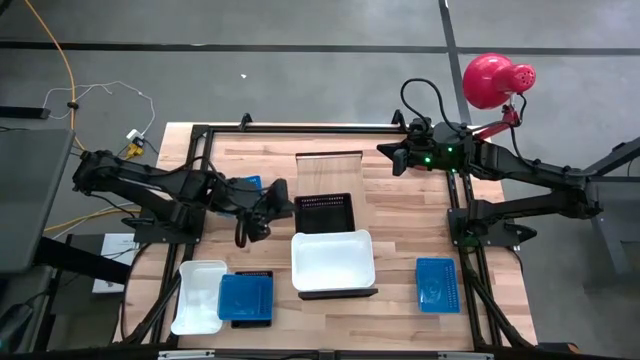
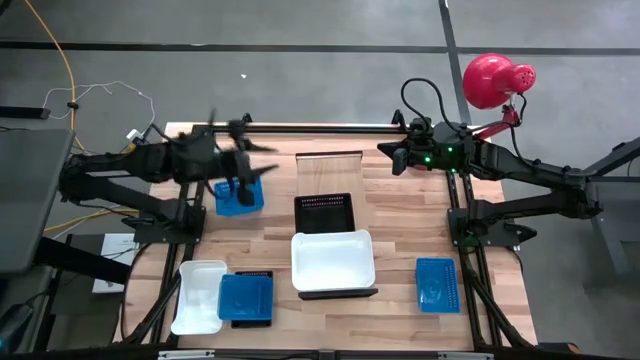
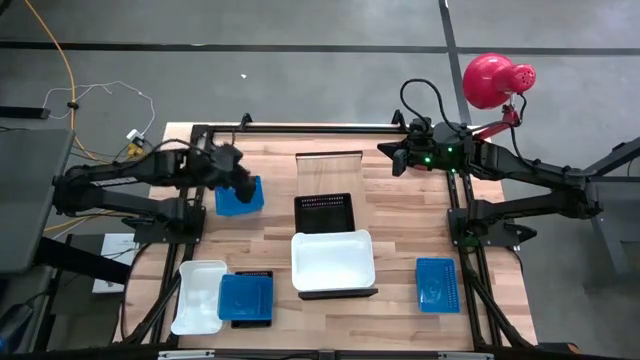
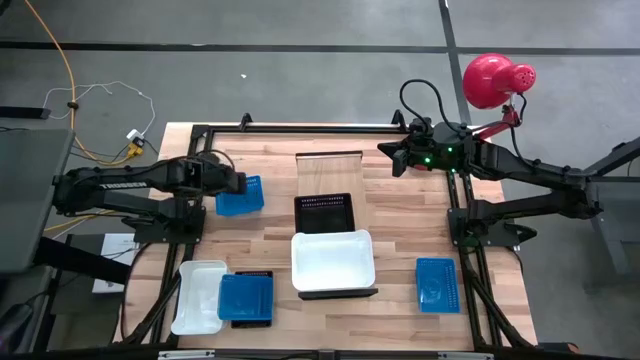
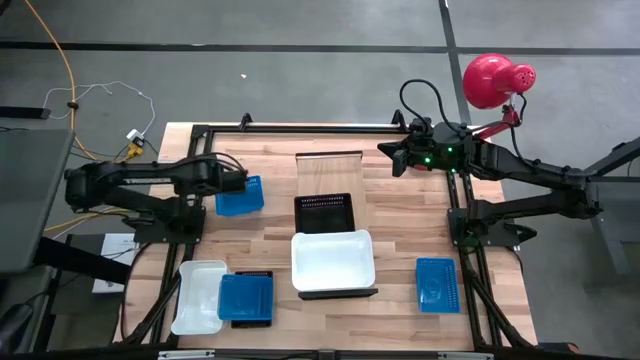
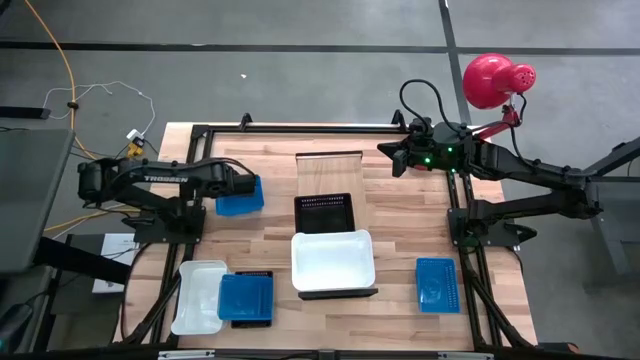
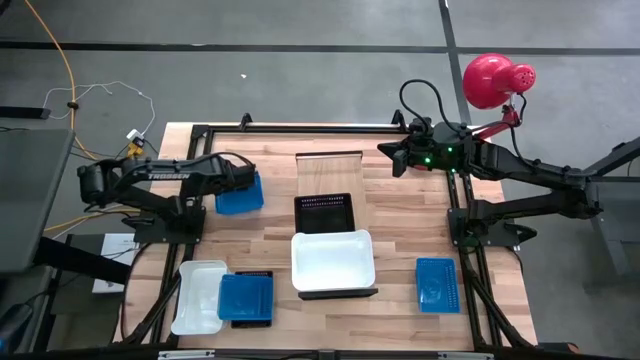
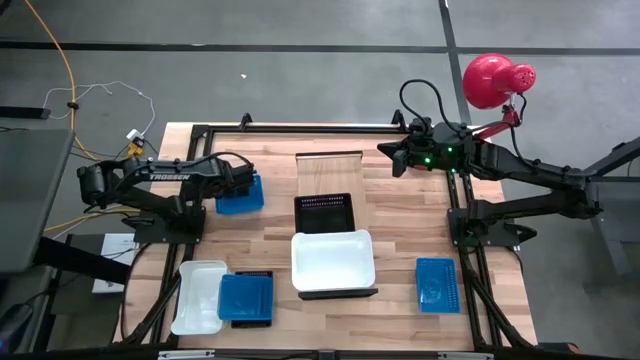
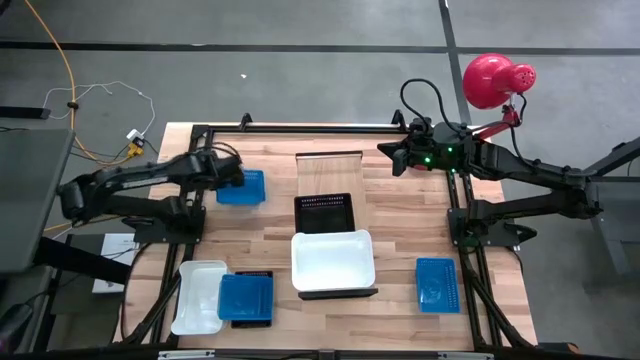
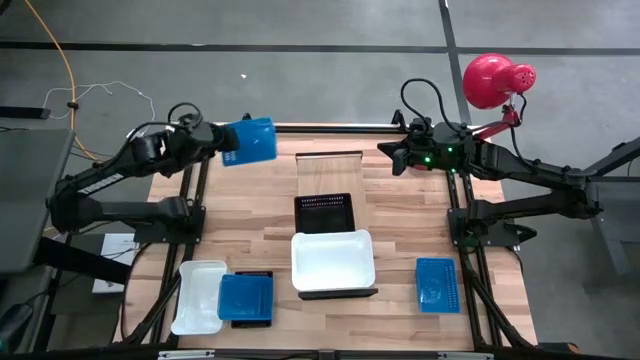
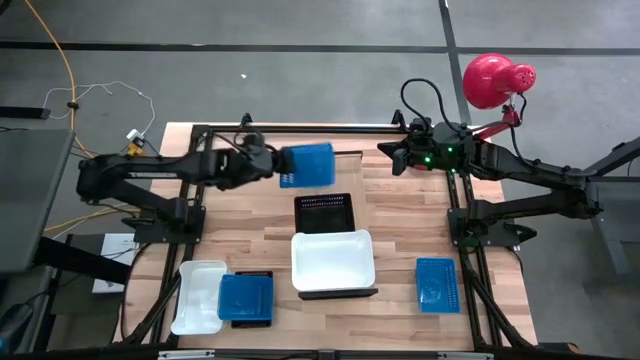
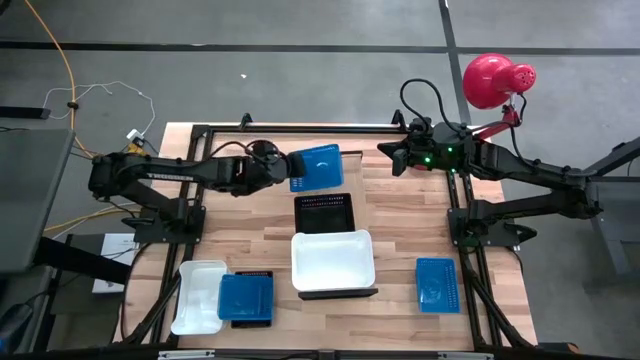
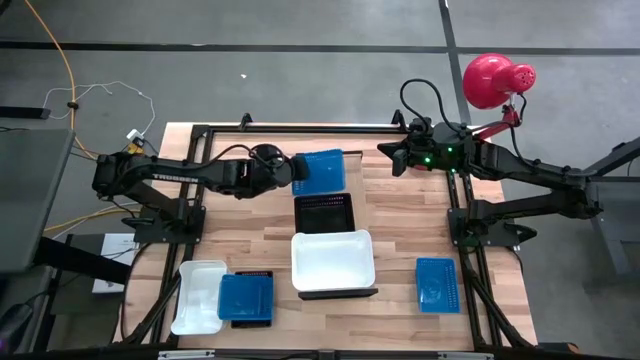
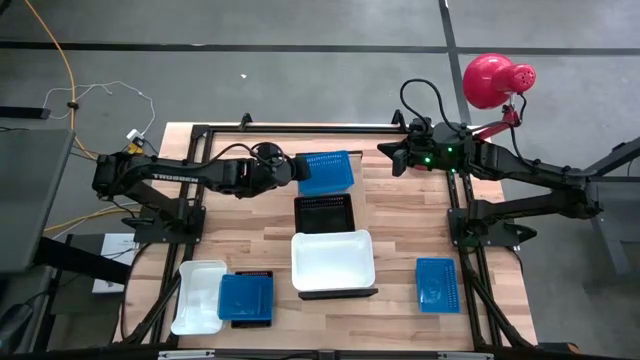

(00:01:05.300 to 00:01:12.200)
Task: Stack baskets on shelf by color
Put the top blue bin on the shelf

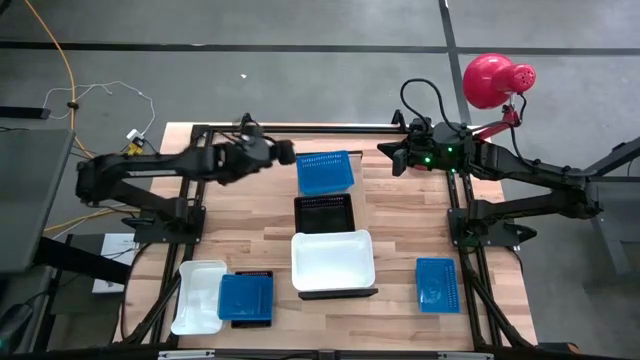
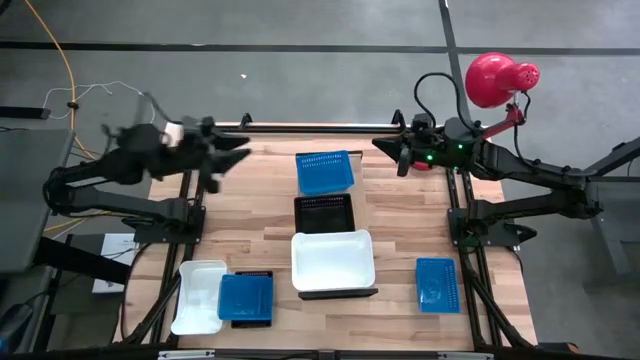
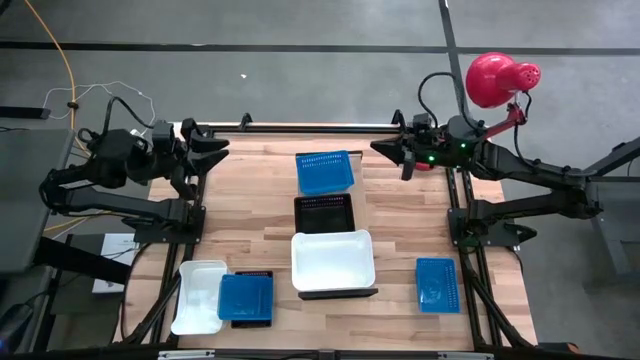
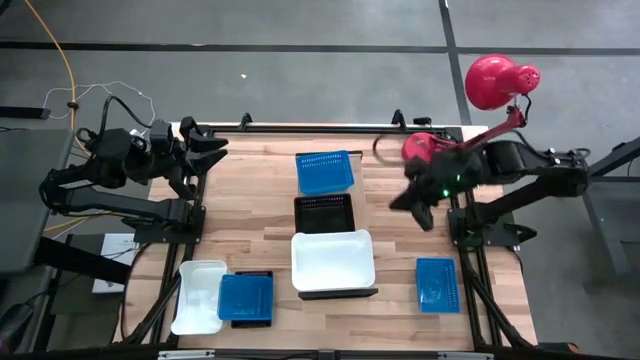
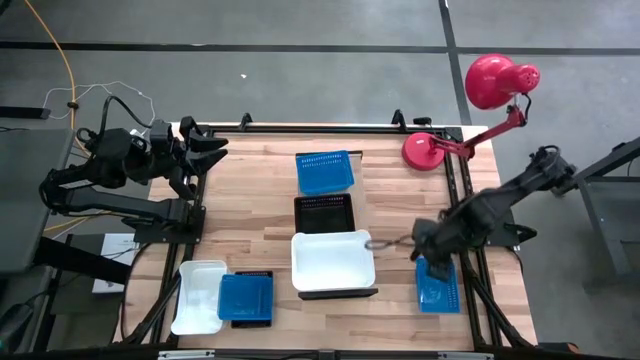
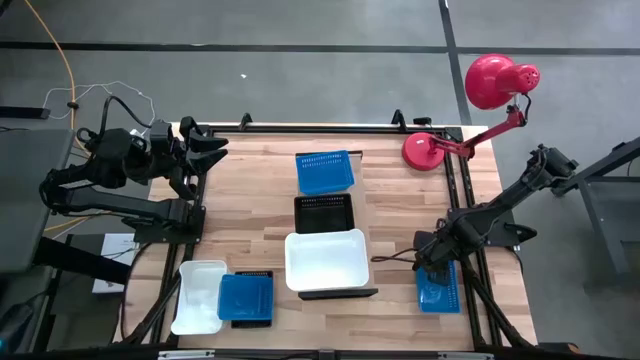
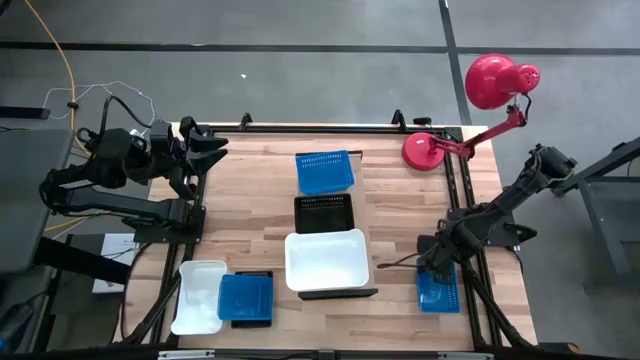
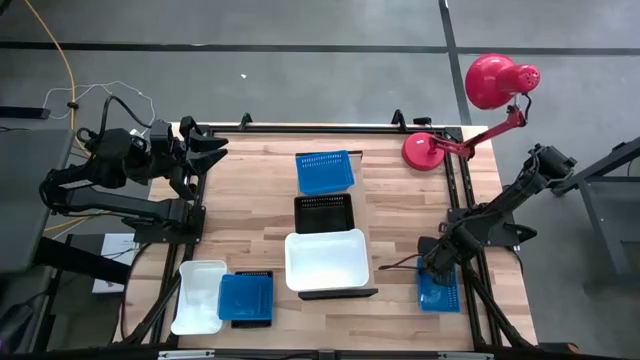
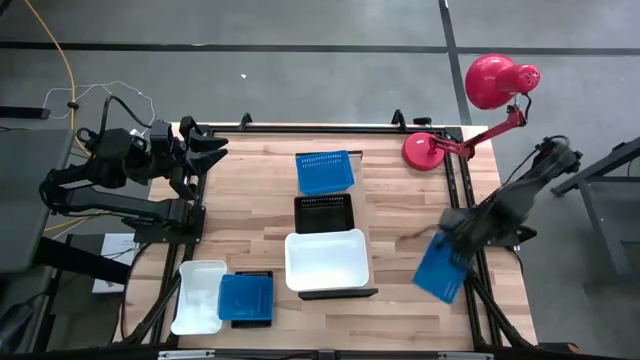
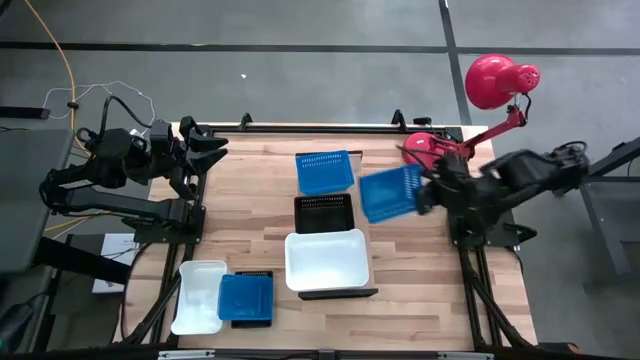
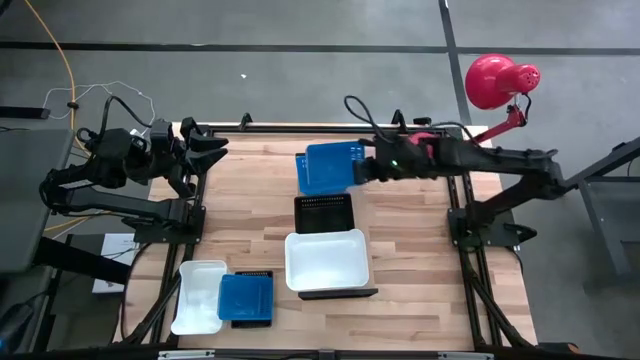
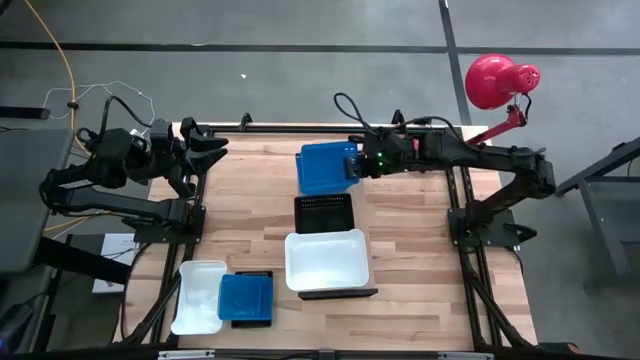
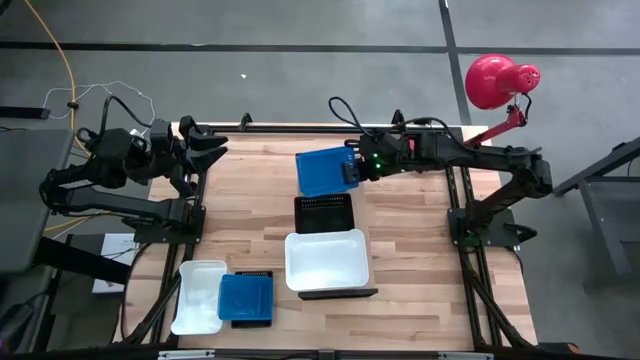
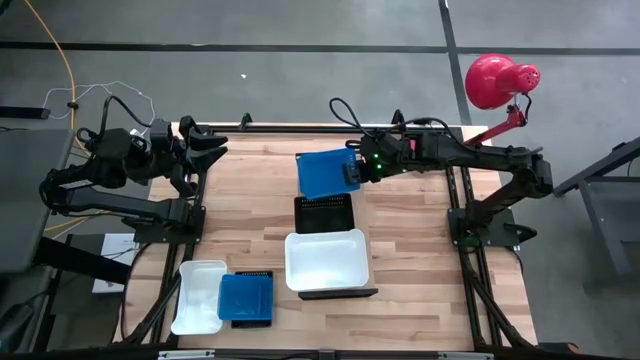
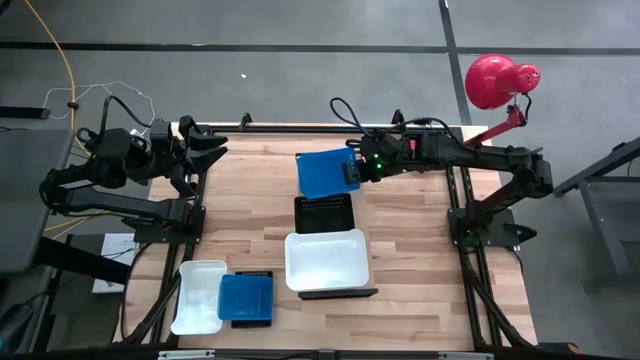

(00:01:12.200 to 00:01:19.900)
Stack the right blue bin on the blue bin on the shelf

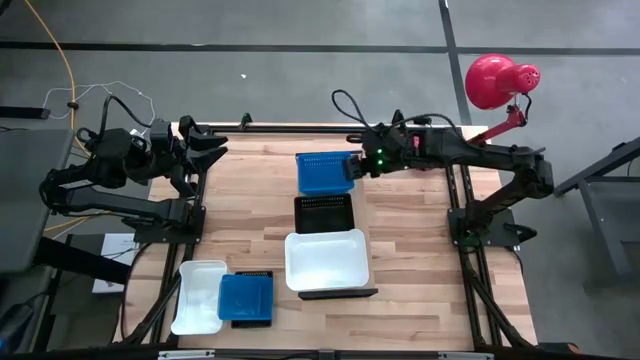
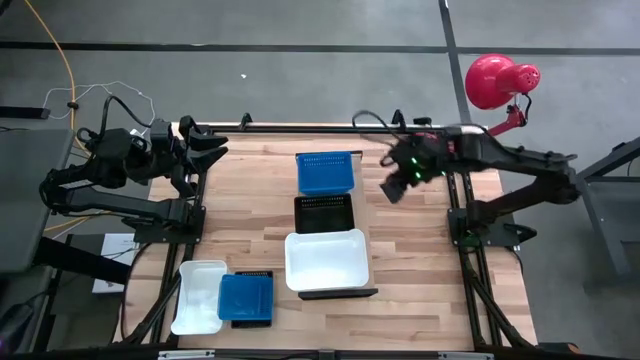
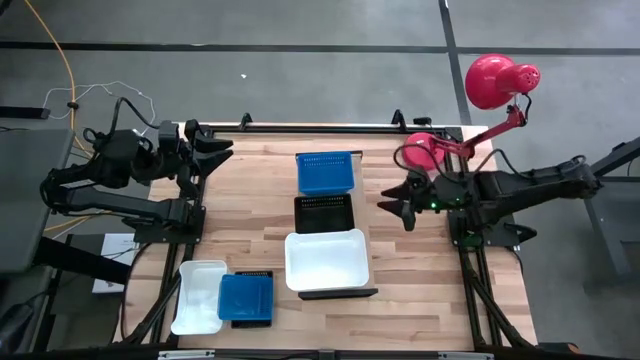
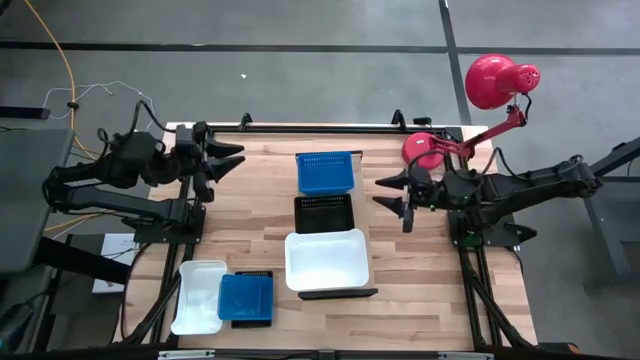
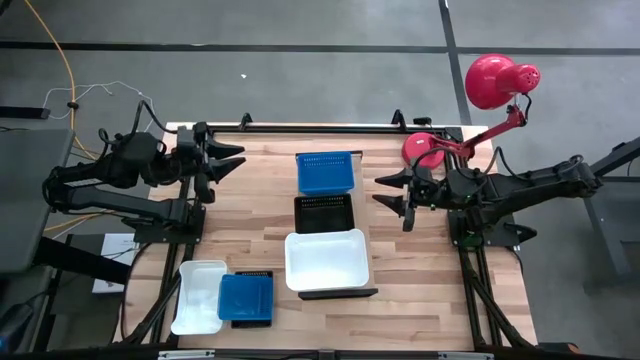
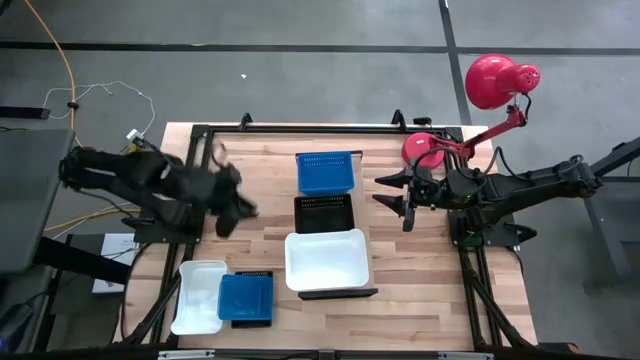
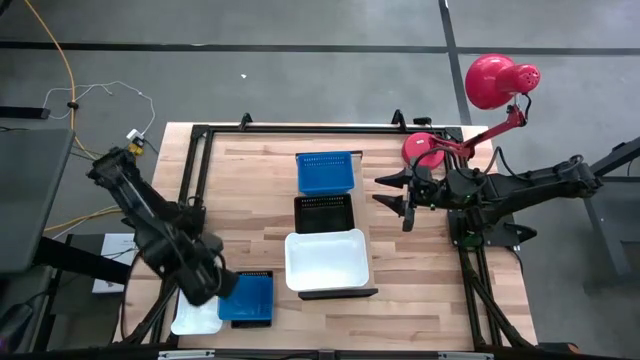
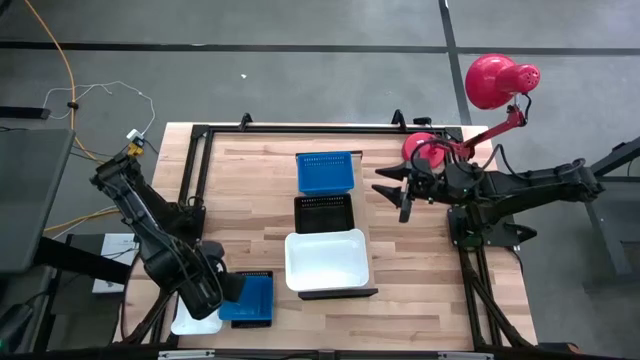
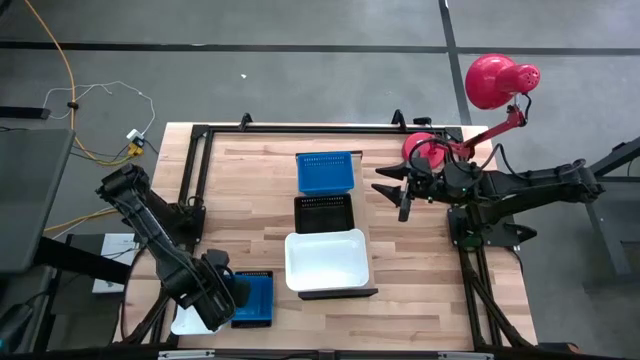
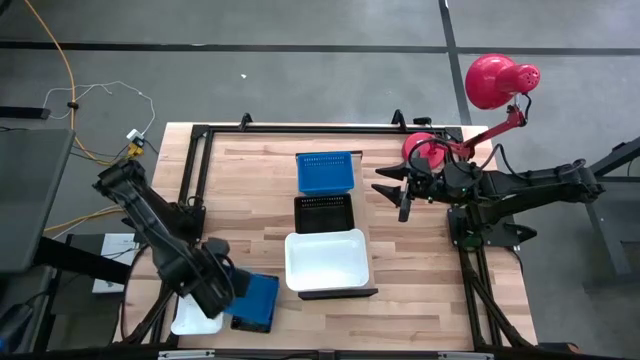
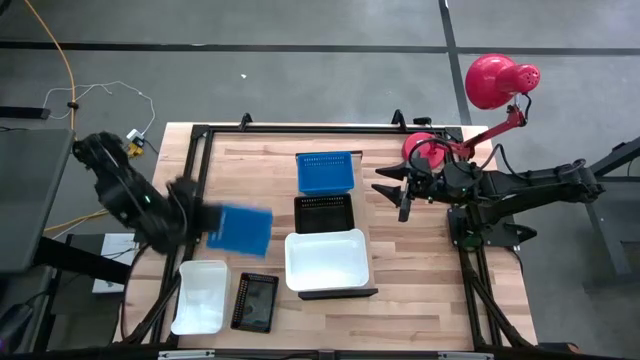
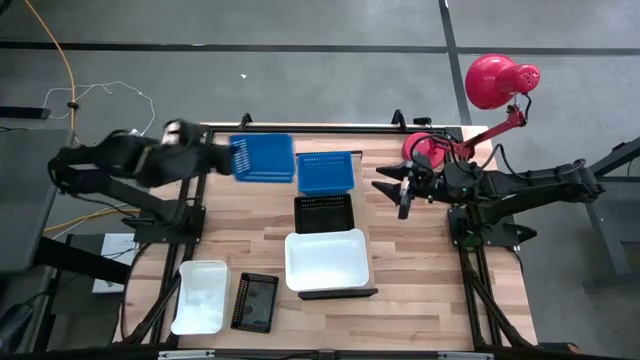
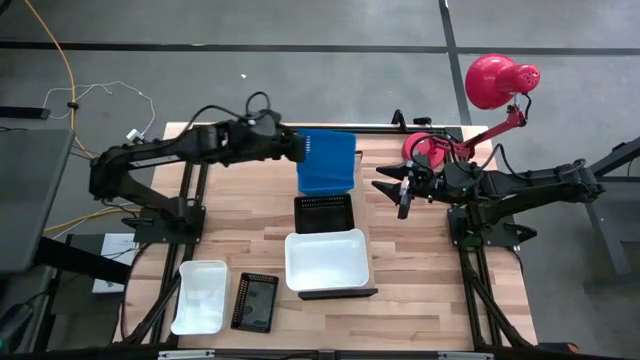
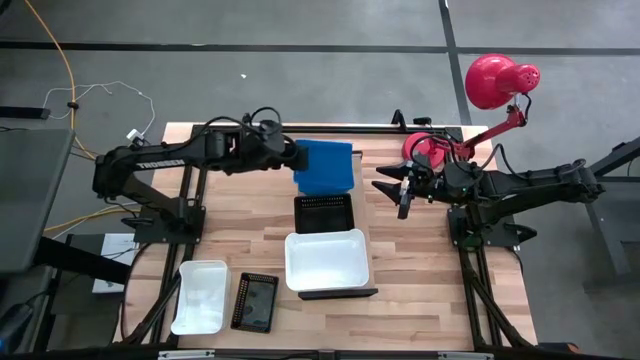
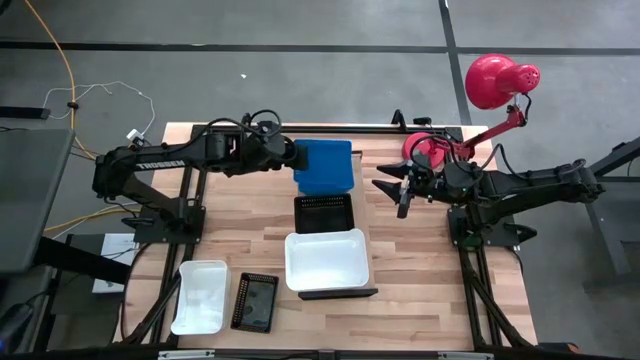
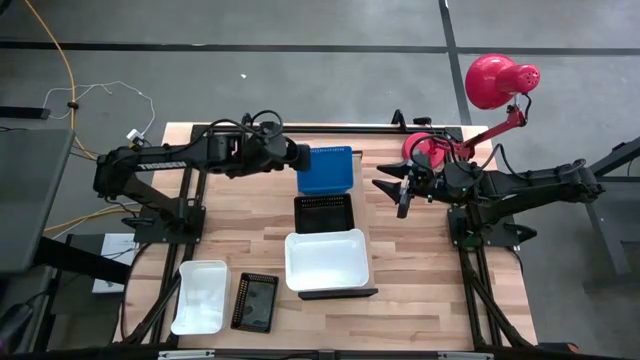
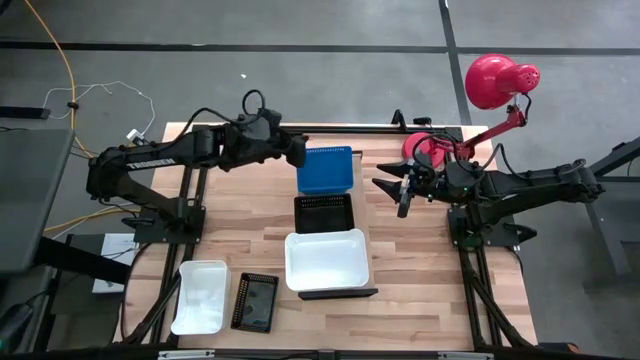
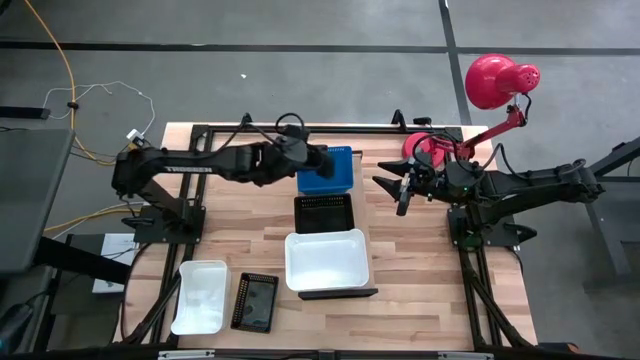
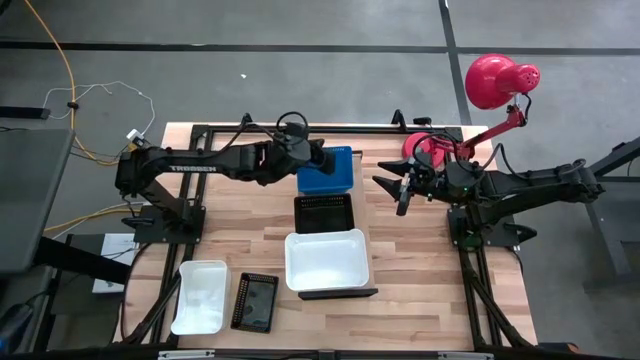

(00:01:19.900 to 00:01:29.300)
Stack the blue bin on the blue bin on the shelf
